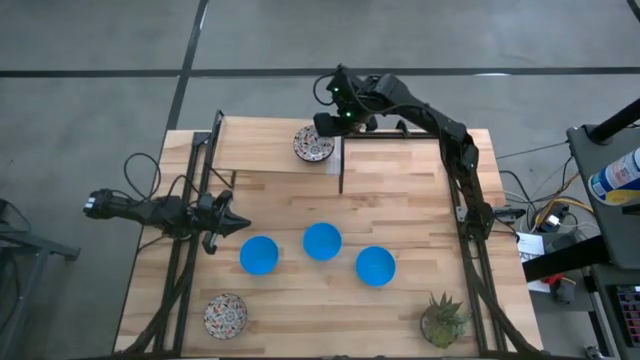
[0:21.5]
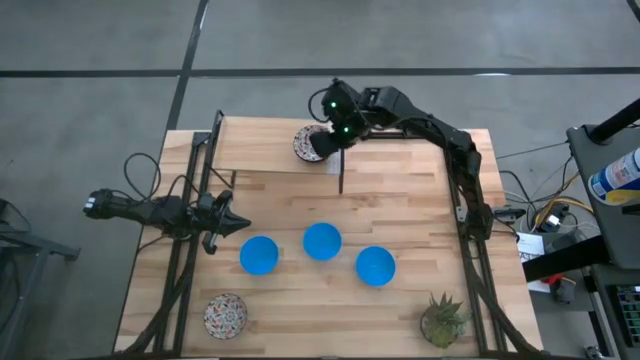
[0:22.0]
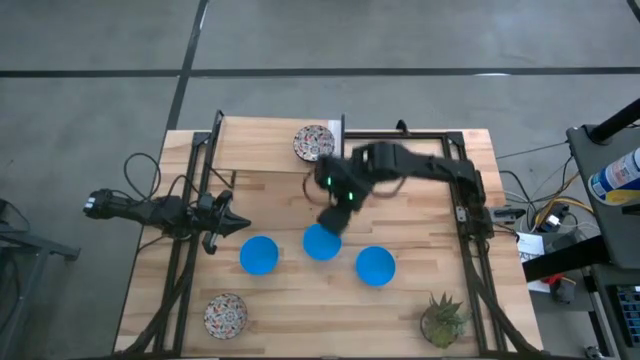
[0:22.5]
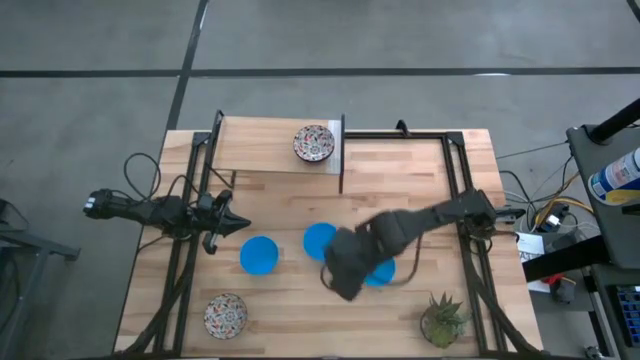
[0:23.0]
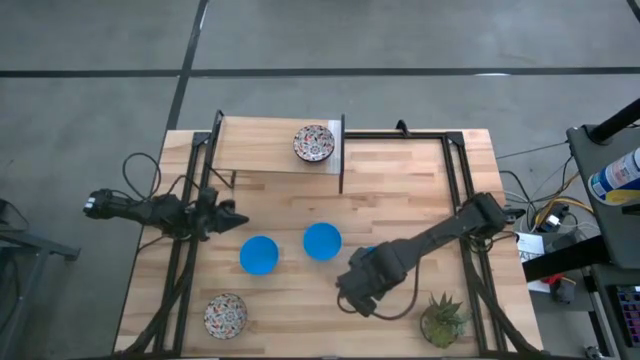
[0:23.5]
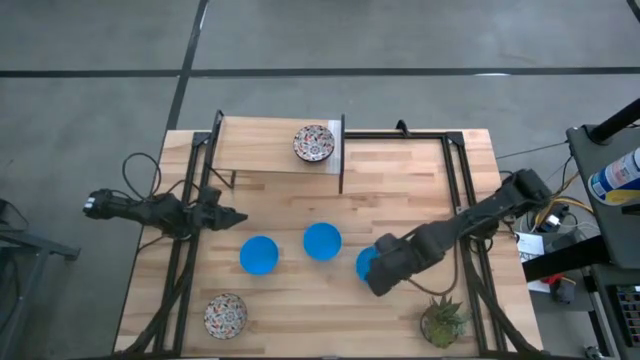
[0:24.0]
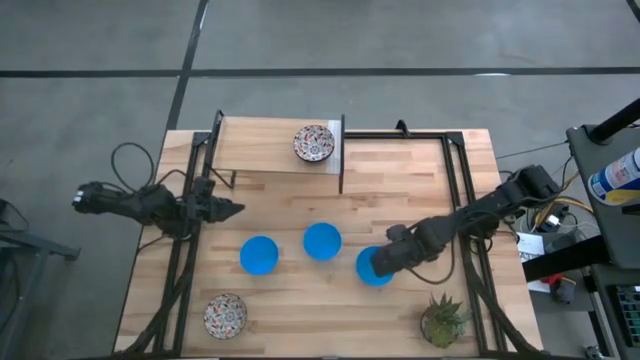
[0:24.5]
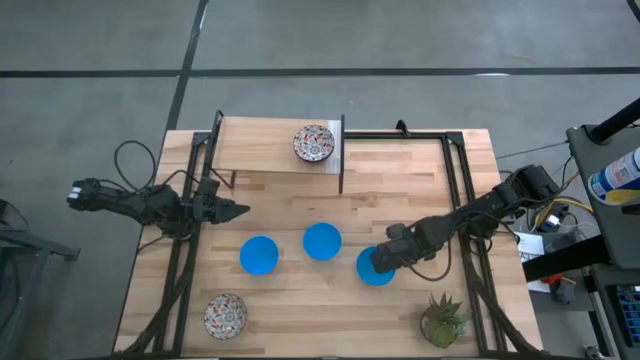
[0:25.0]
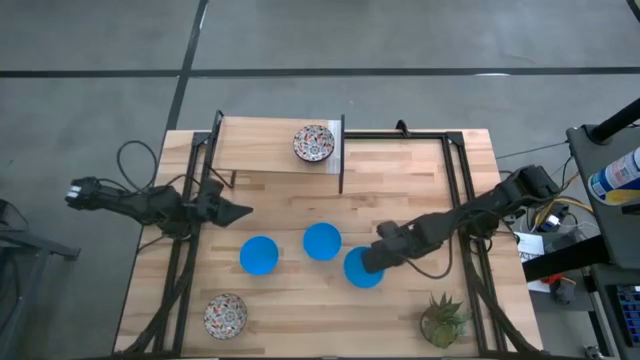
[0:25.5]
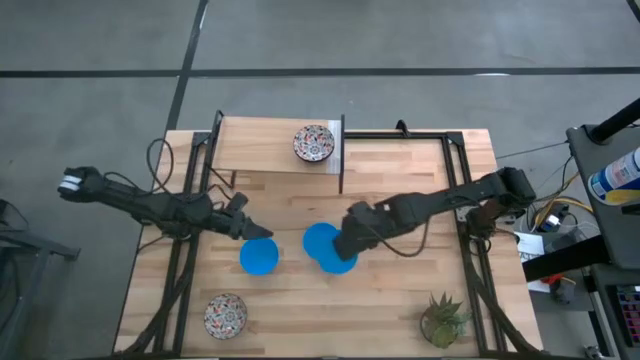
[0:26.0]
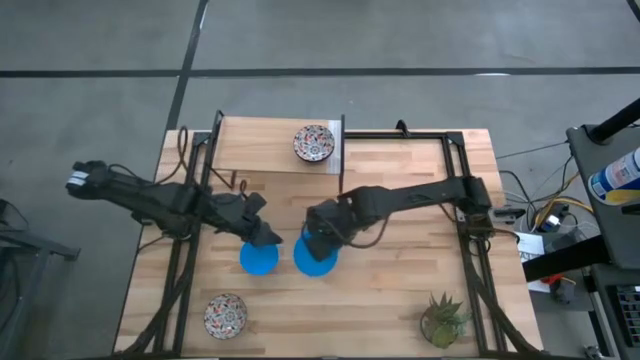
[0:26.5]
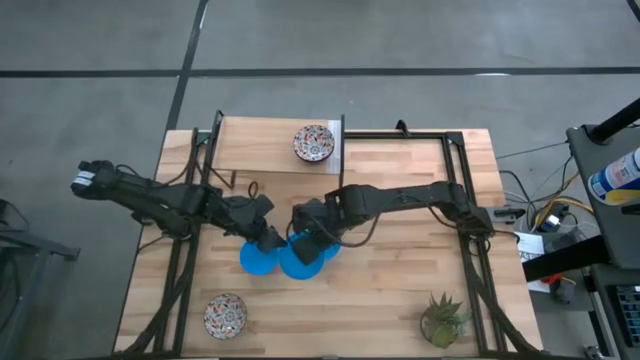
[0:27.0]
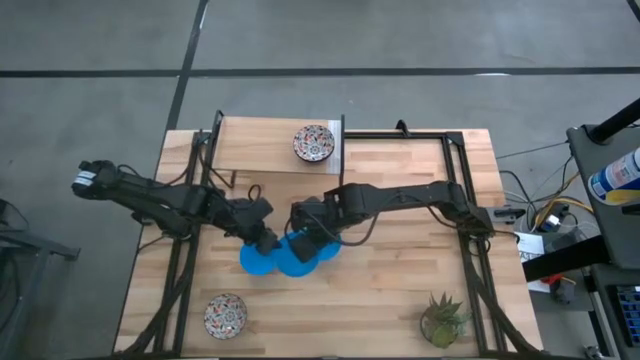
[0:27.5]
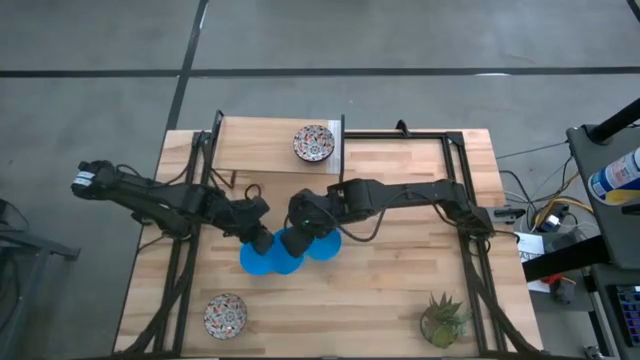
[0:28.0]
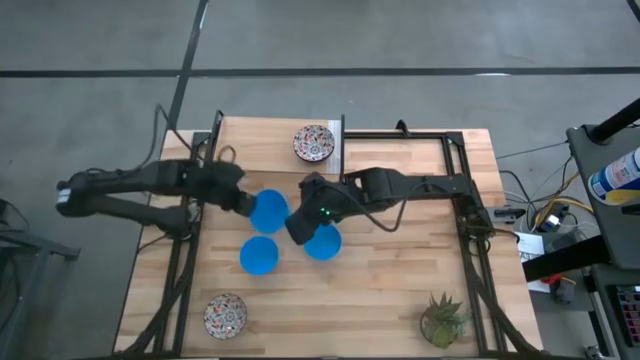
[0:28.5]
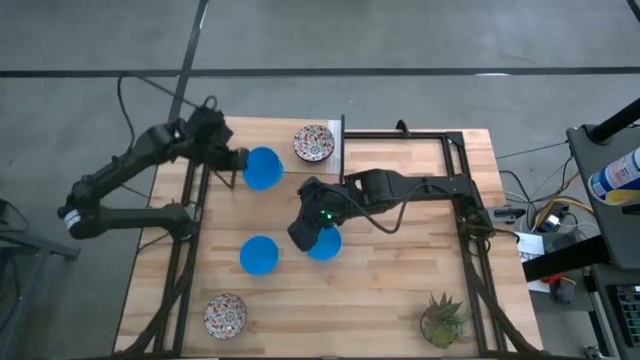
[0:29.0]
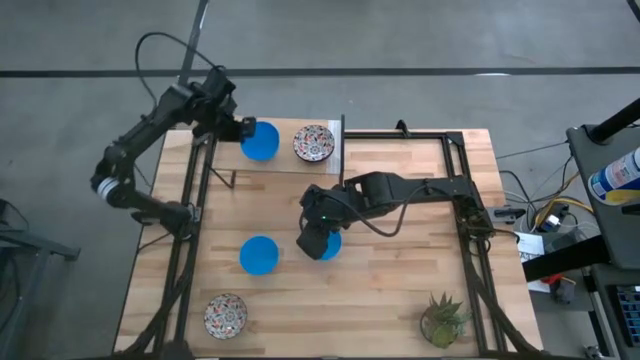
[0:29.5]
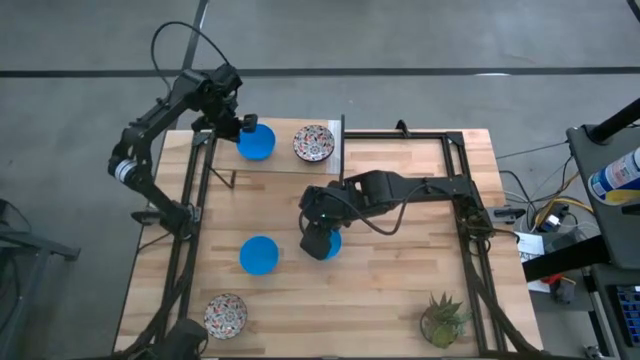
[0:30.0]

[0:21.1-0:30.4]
Task: Pick & Place Mini bowls
Put the right blue bowl on the shelf

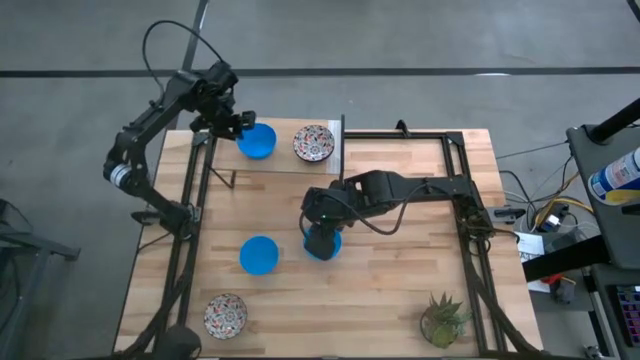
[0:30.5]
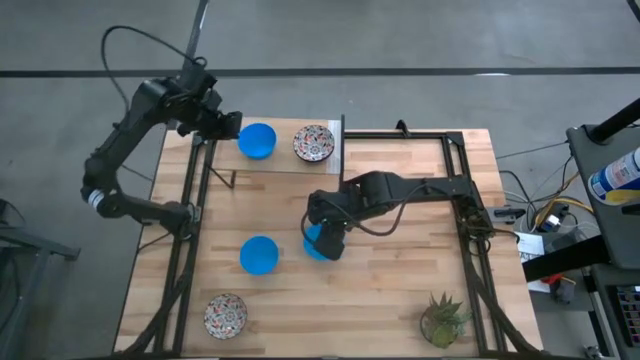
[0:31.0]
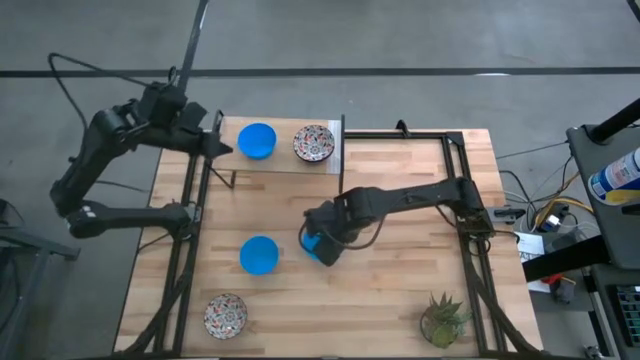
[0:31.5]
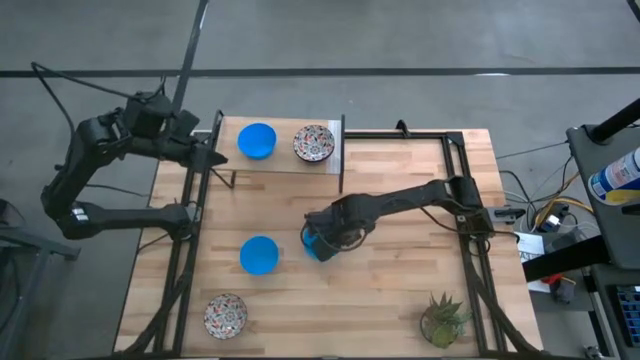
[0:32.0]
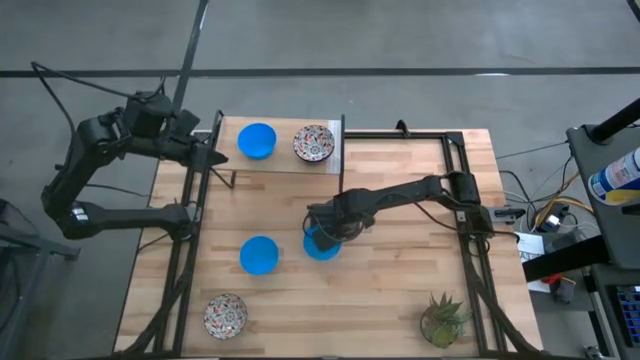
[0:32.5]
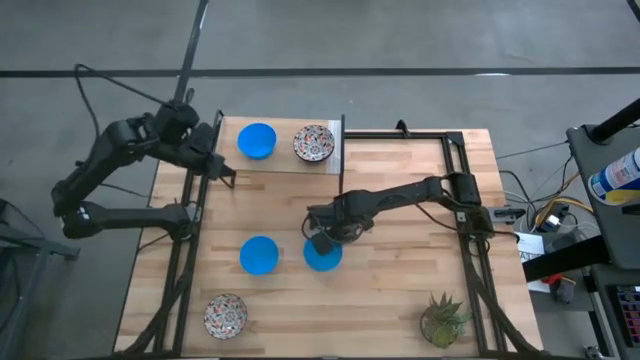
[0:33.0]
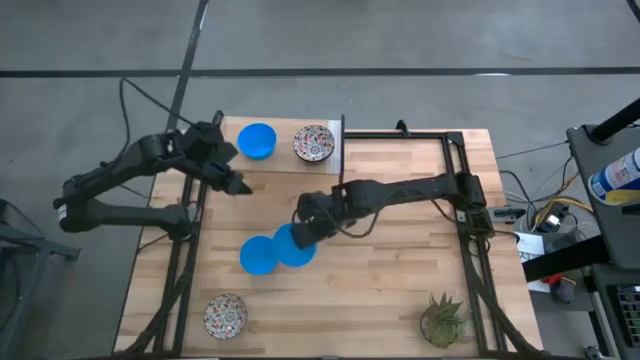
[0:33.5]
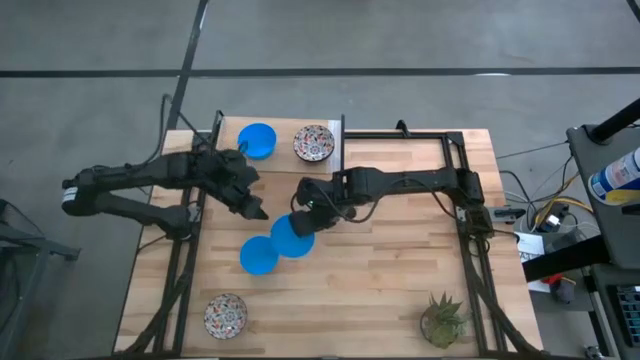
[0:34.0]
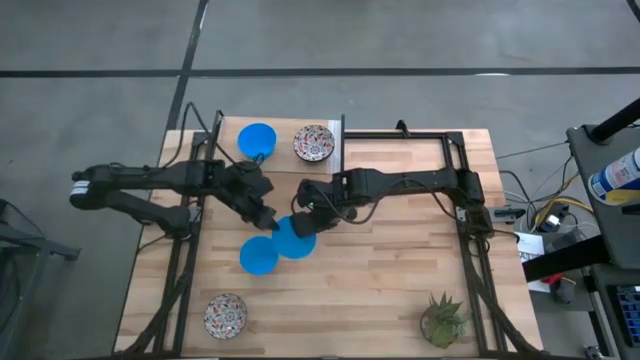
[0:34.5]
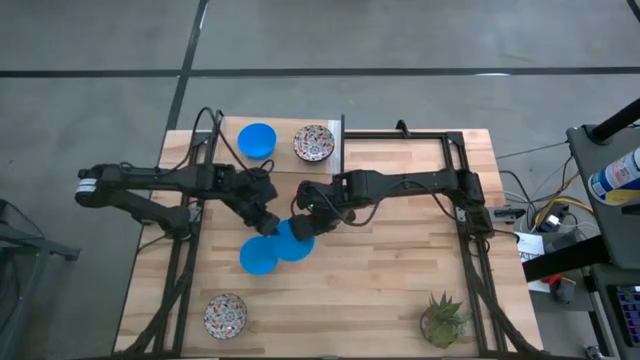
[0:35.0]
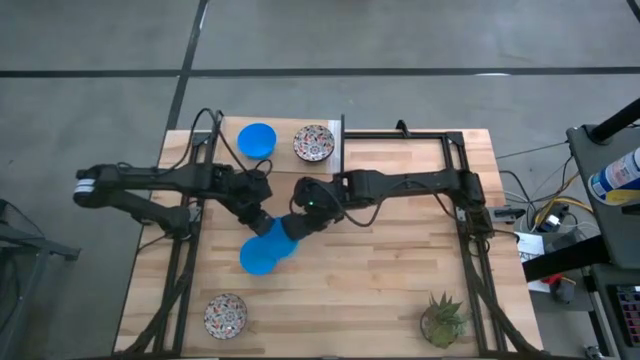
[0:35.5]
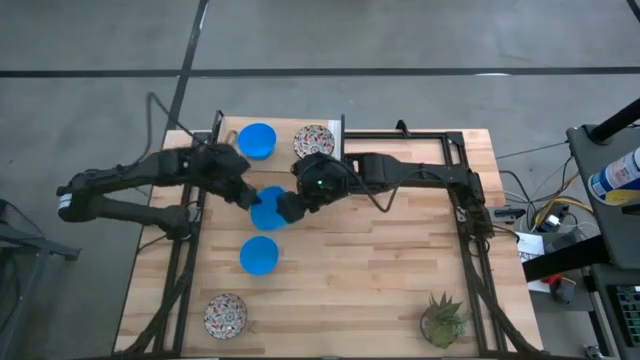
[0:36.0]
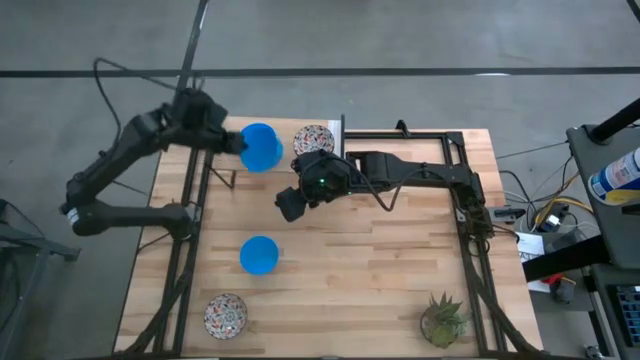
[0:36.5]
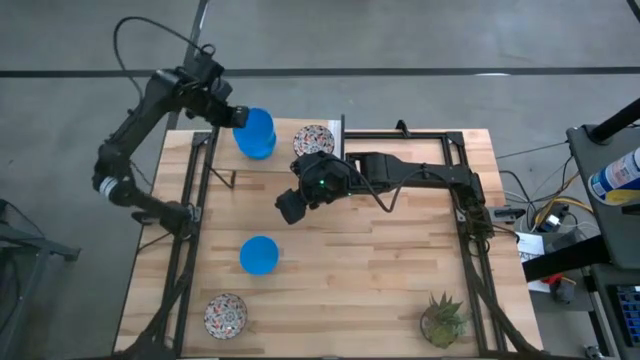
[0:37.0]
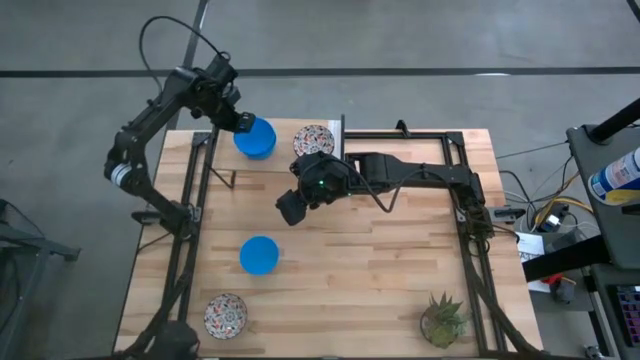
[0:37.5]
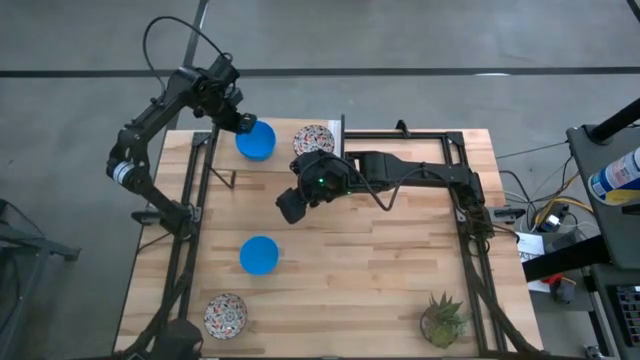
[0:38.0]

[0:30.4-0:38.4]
Stack the right blue bowl on top of the blue bowl on the shelf

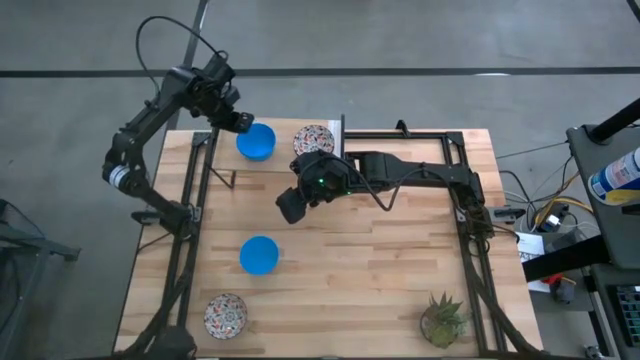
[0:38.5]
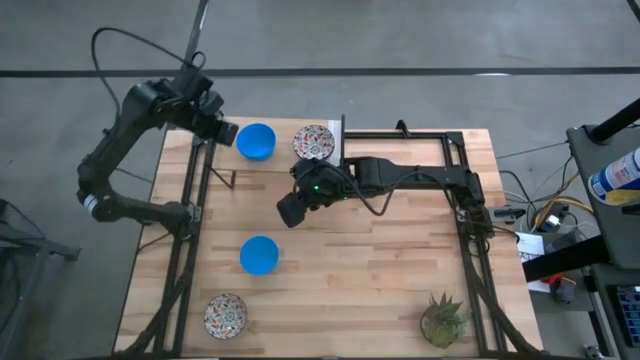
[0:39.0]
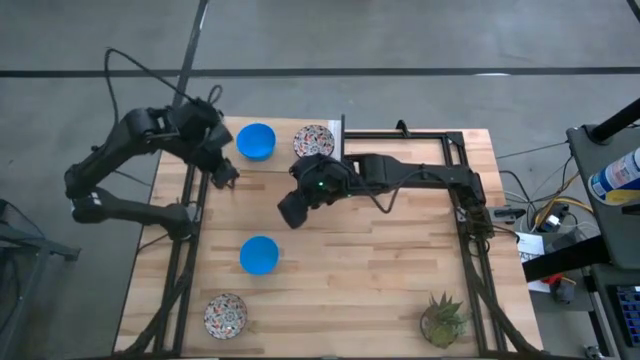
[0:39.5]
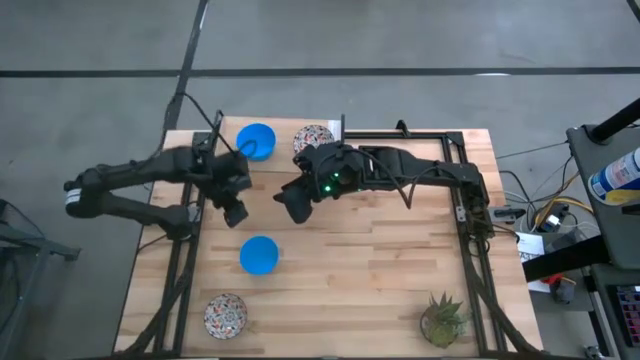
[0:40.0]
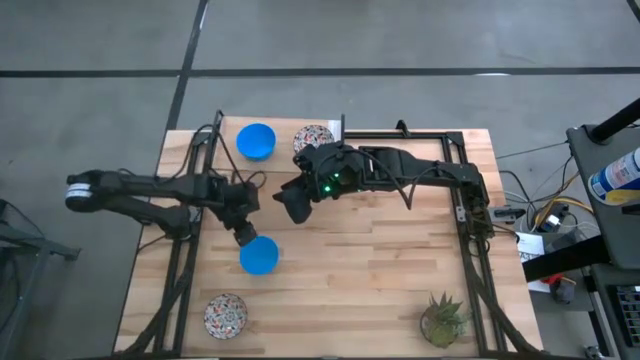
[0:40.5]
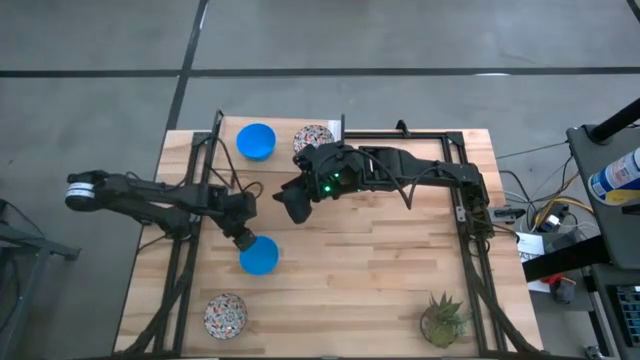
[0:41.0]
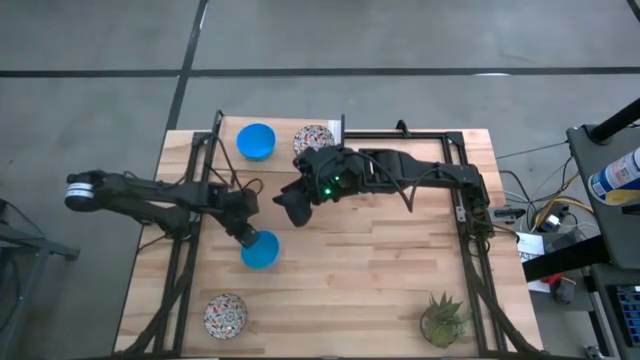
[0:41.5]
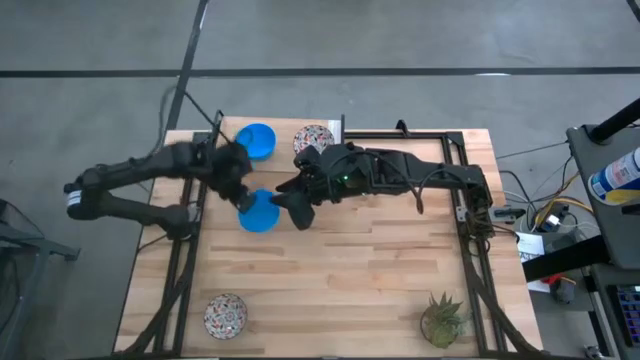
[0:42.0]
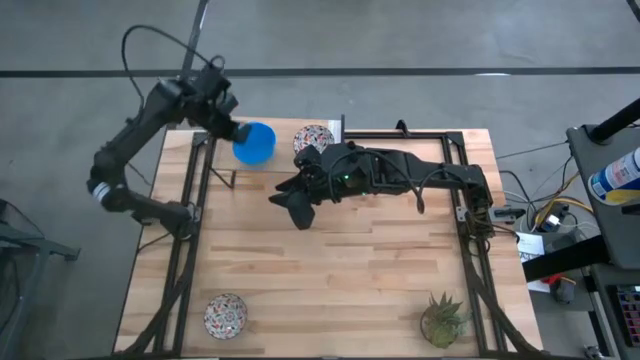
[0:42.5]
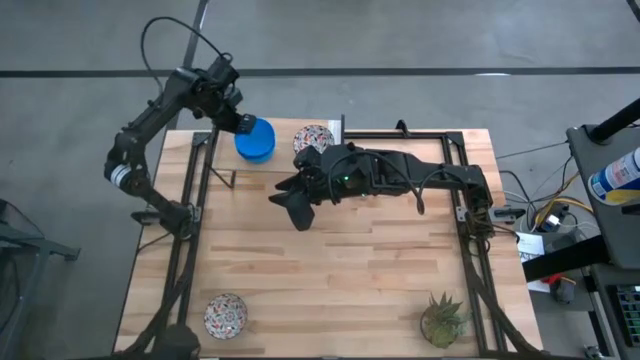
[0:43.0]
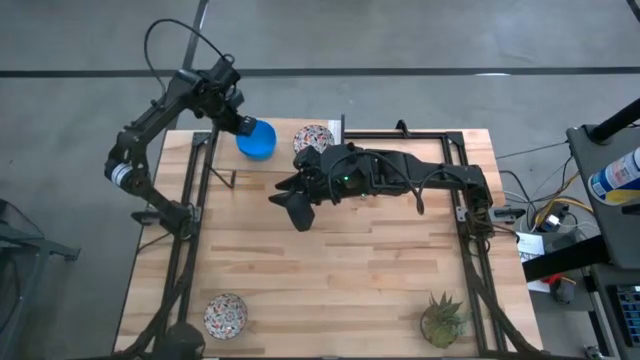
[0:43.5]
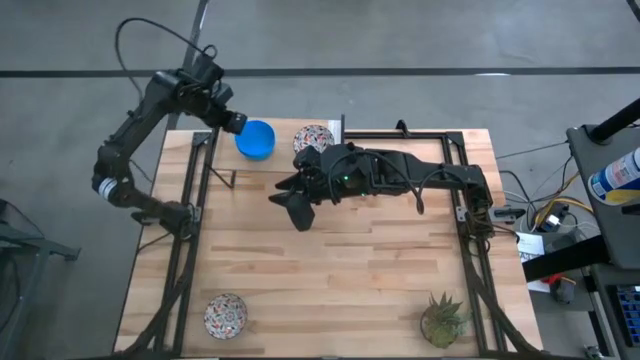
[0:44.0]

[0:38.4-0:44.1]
Stack the blue bowl on top of the blue bowls on the shelf
